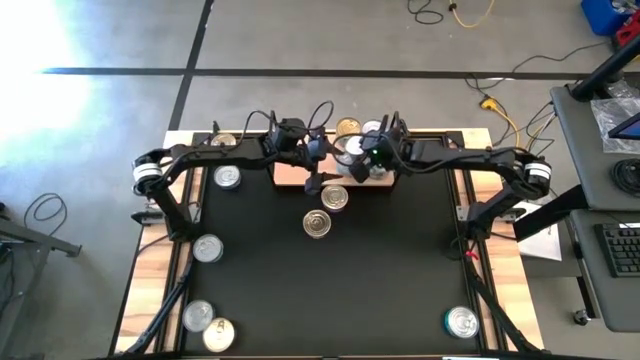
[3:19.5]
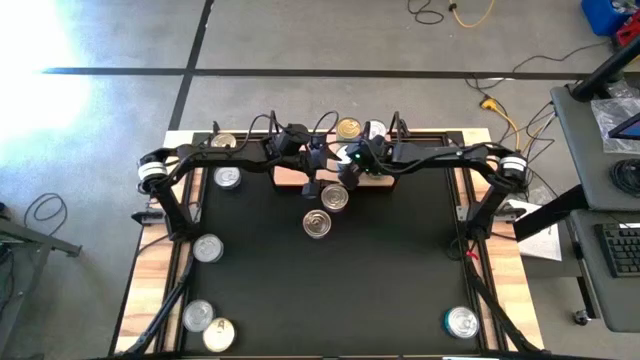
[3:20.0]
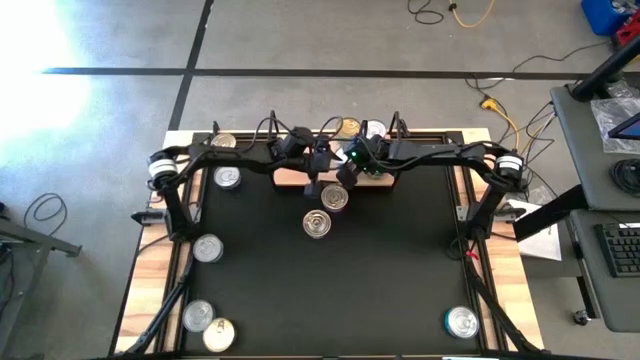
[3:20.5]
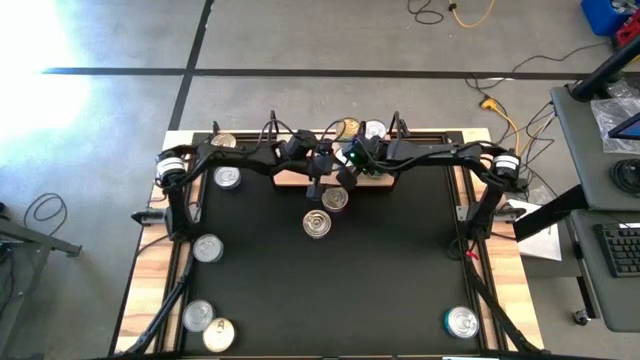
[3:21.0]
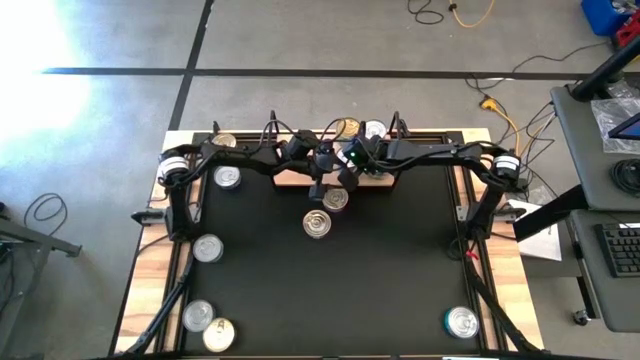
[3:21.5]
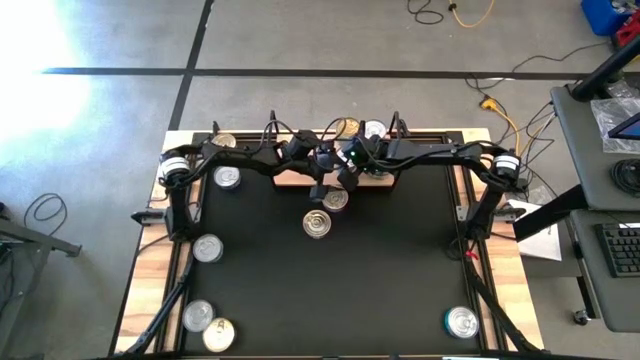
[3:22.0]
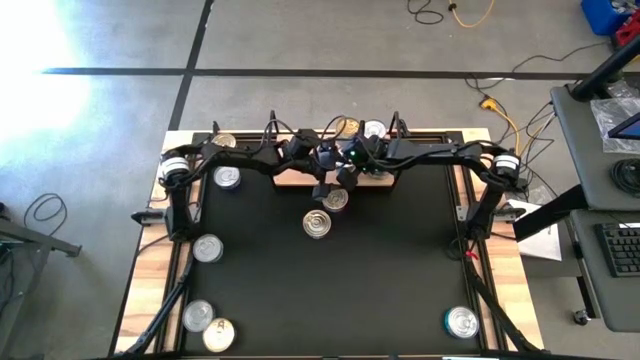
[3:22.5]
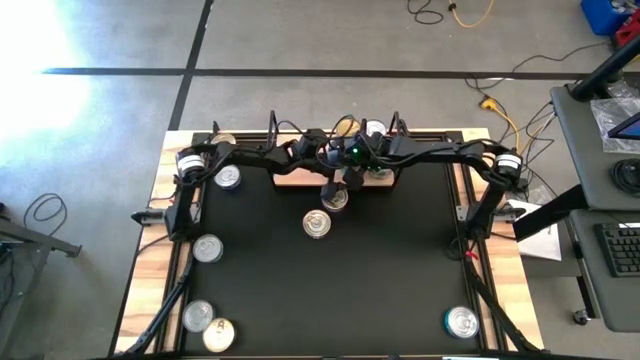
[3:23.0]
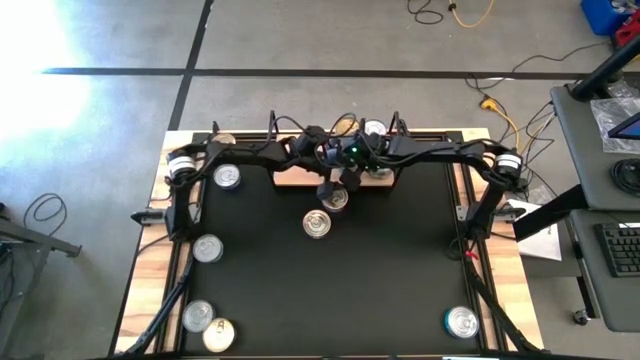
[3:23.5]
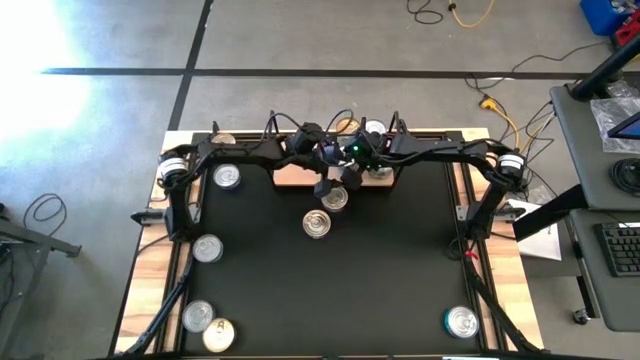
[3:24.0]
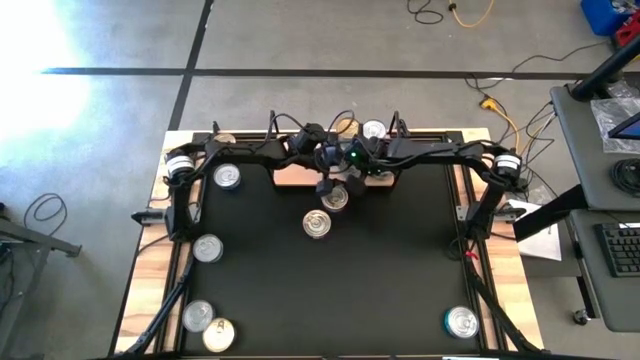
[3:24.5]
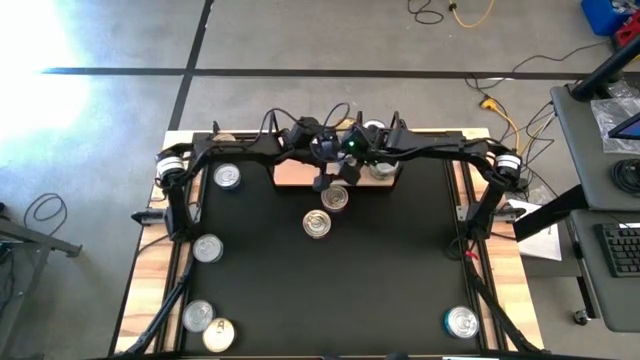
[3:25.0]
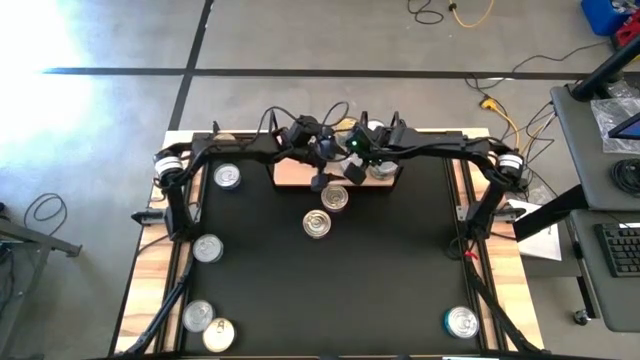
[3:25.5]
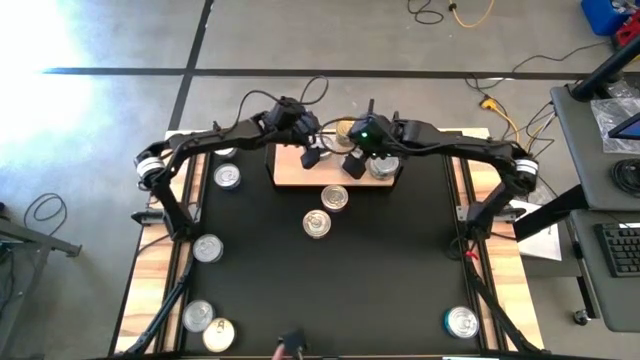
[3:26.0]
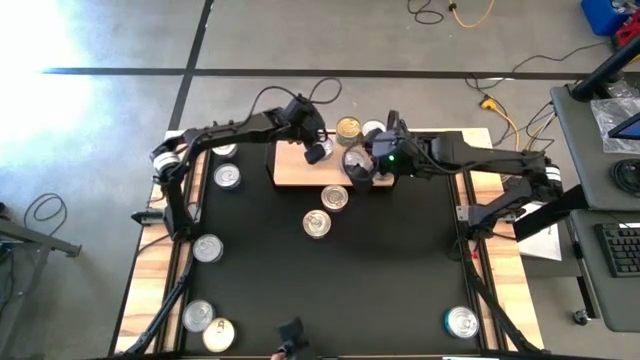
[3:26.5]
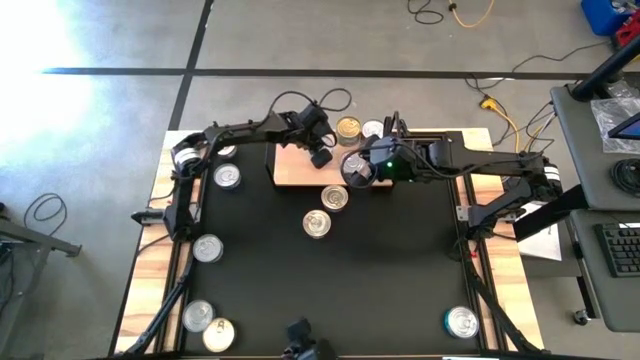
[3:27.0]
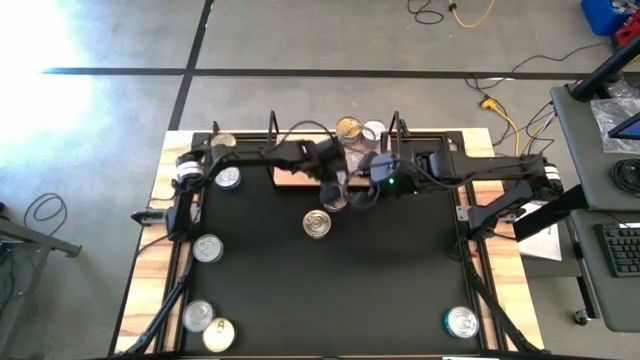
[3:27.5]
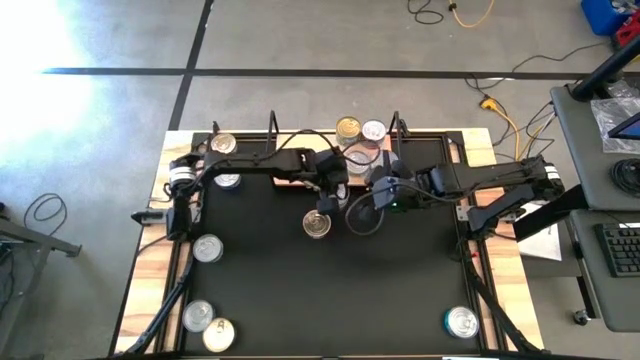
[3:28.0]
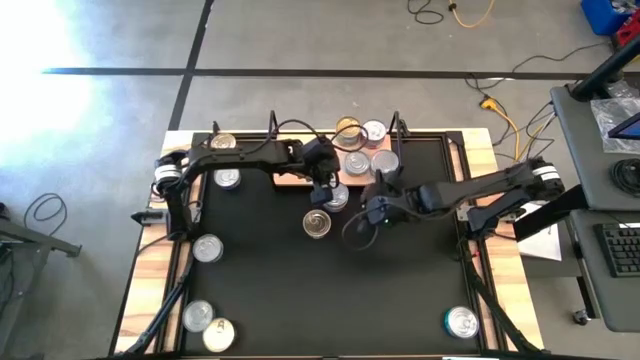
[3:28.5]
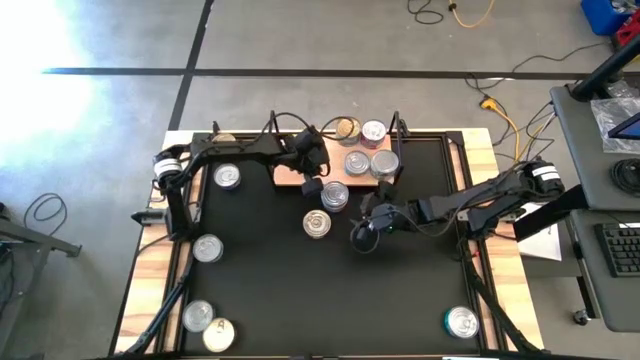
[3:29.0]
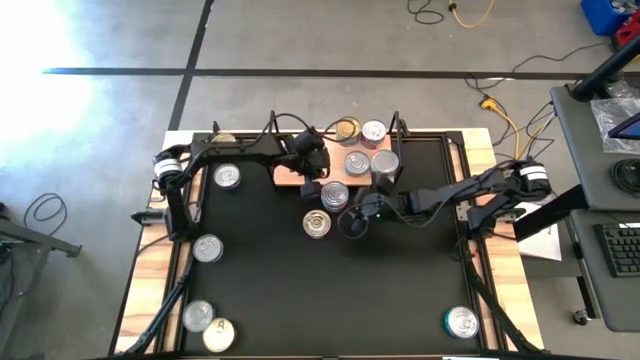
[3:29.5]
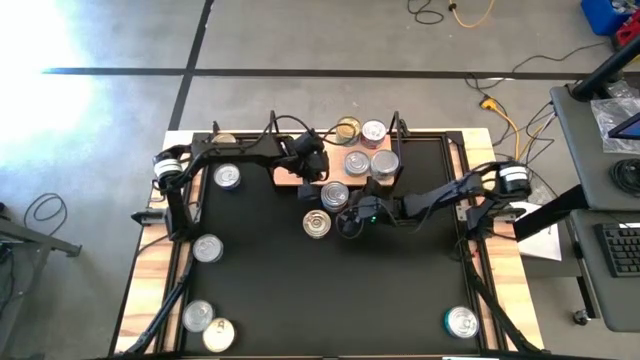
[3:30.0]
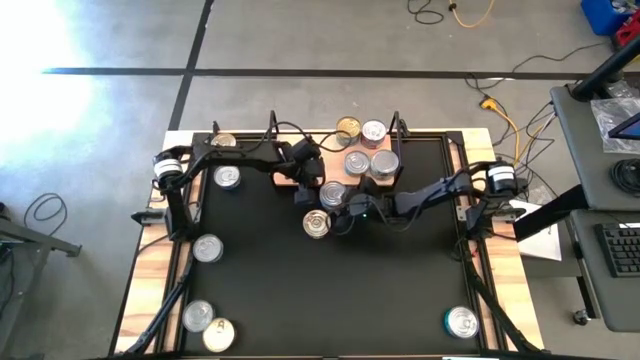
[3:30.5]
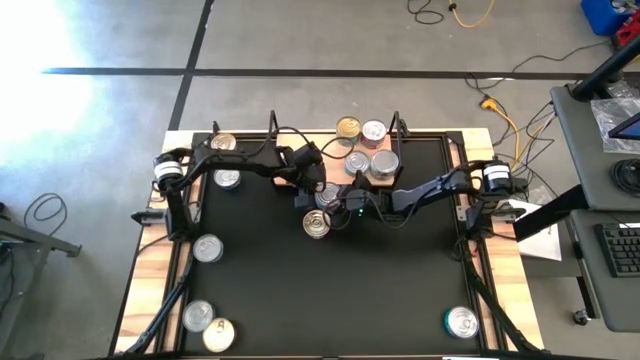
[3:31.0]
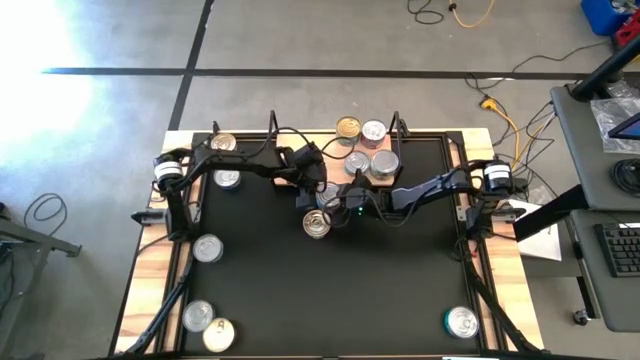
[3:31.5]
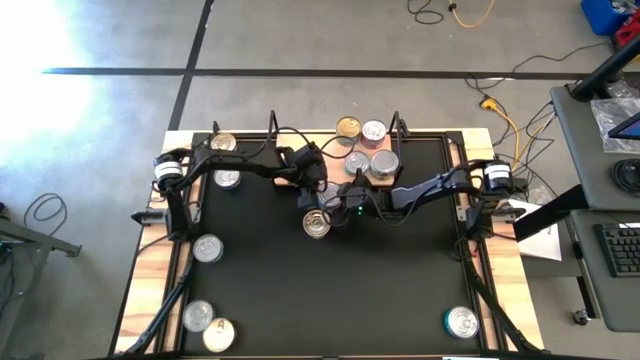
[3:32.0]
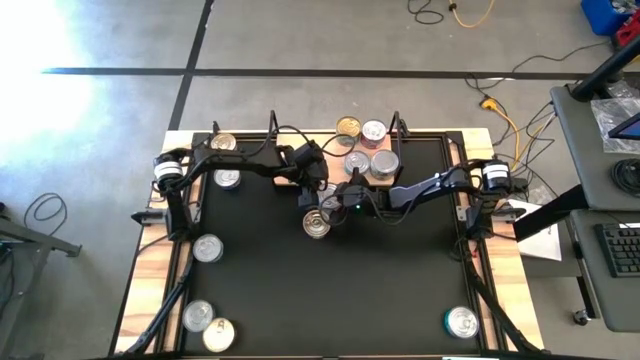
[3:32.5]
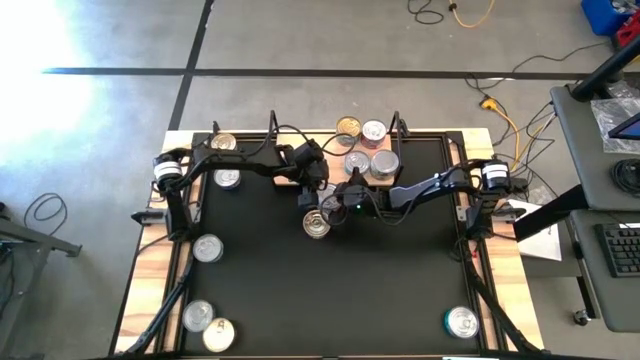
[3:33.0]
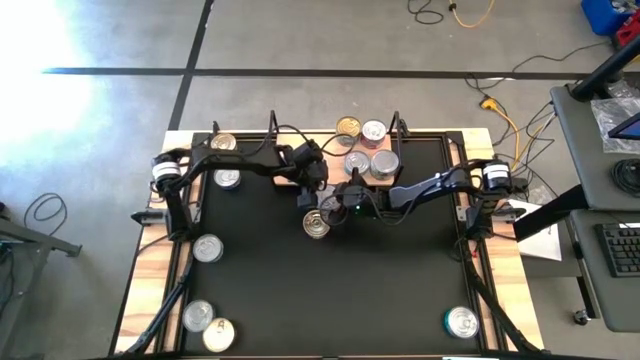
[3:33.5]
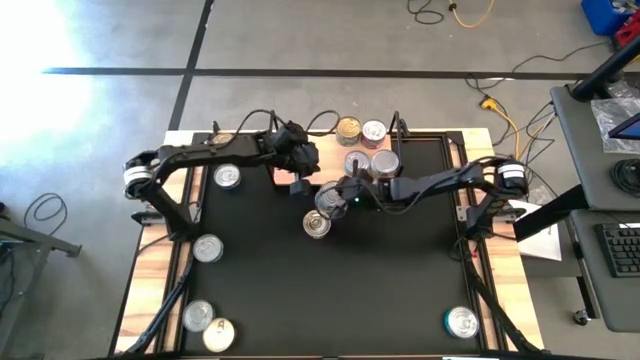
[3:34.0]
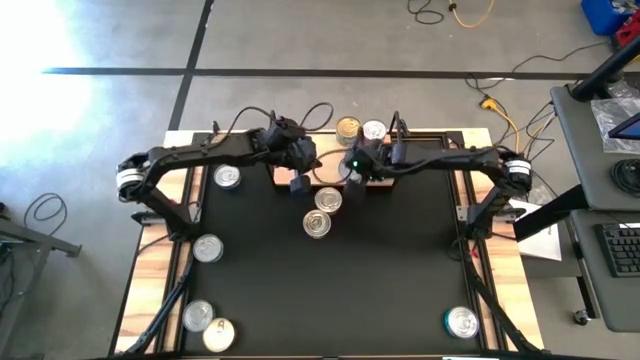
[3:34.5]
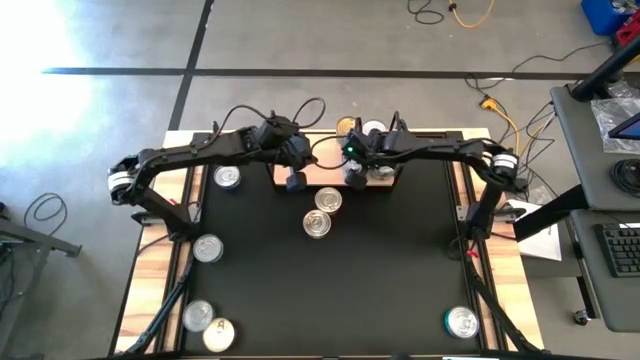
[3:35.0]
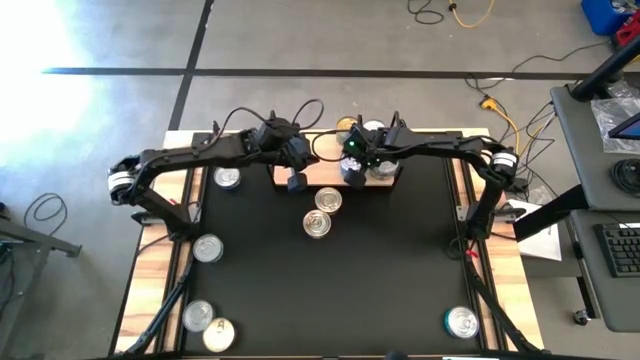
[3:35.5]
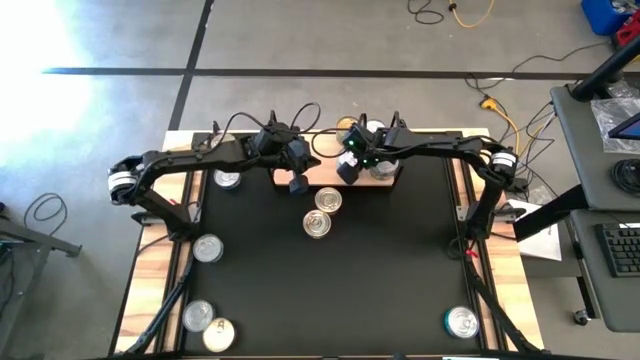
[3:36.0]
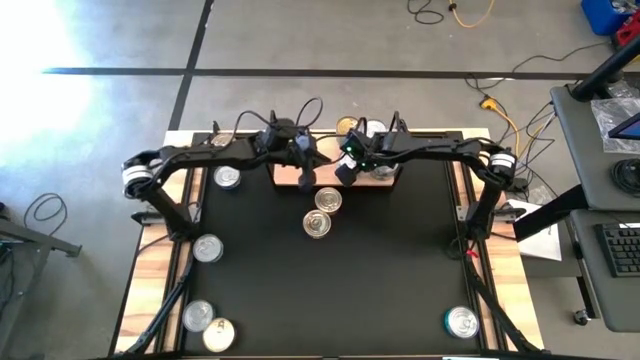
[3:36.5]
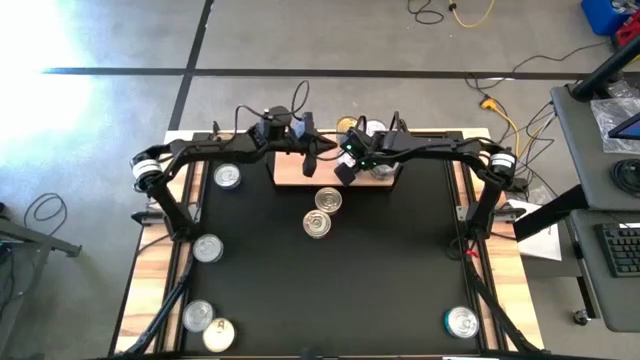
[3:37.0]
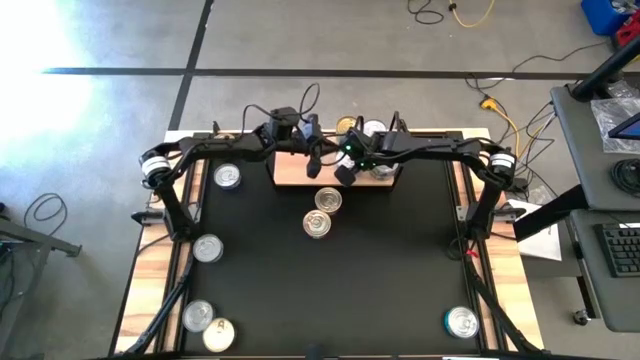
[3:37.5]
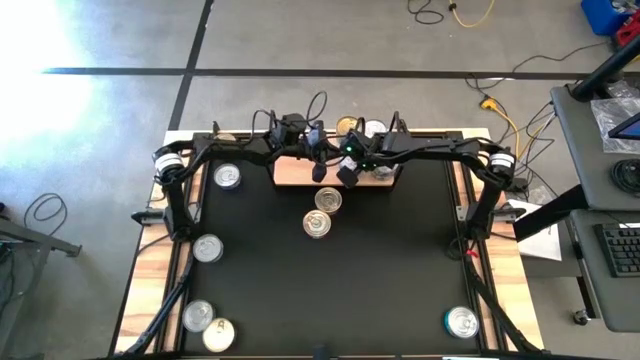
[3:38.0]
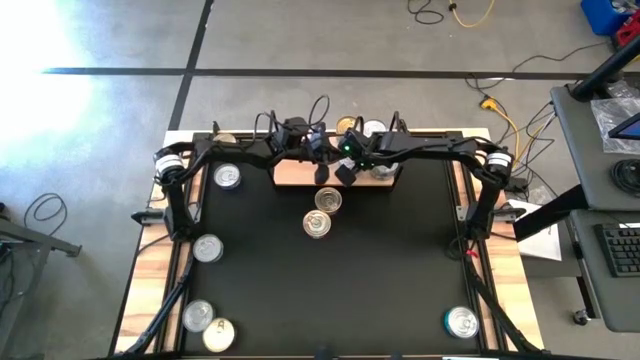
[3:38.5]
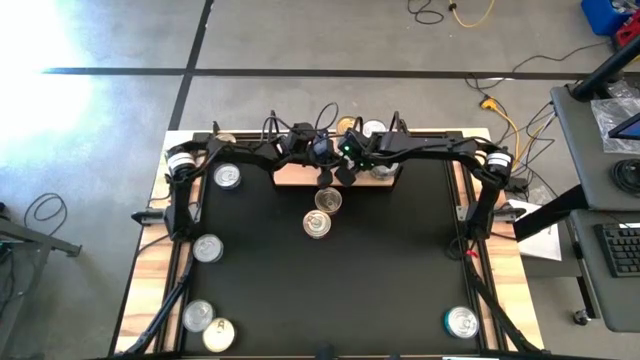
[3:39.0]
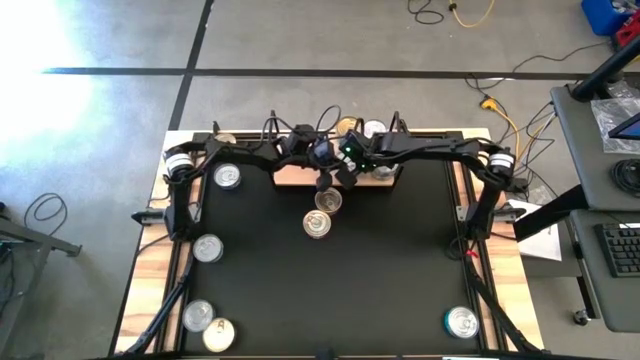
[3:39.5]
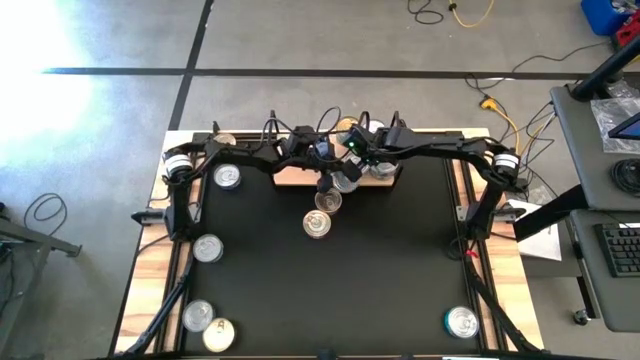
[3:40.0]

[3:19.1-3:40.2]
Task: Stack canned seafood by type on shelf
Stack the yellow-blue tuna can on top of the other yellow-blue tuna can on the shelf
